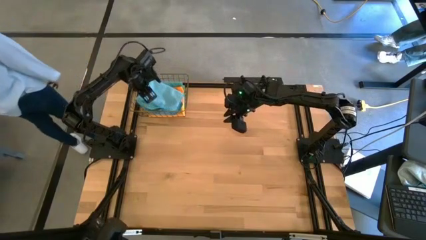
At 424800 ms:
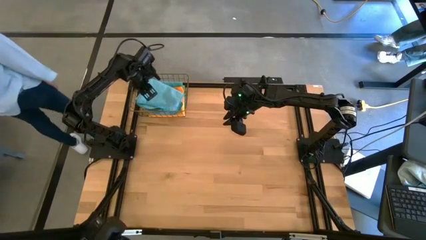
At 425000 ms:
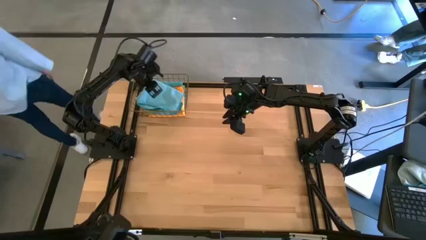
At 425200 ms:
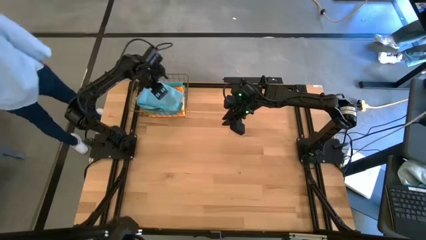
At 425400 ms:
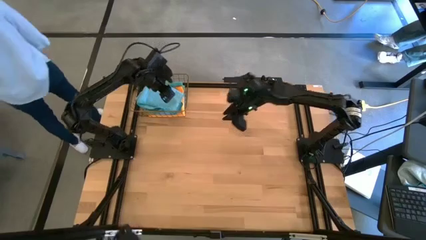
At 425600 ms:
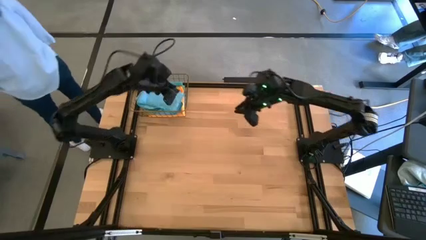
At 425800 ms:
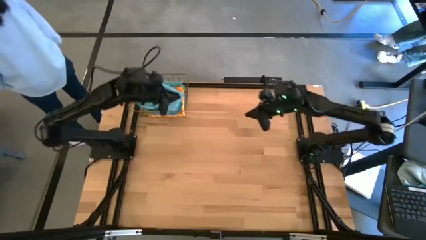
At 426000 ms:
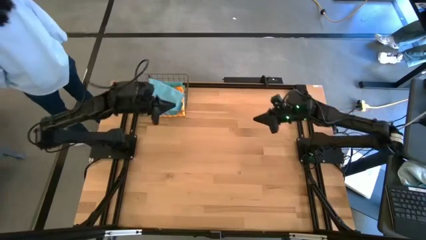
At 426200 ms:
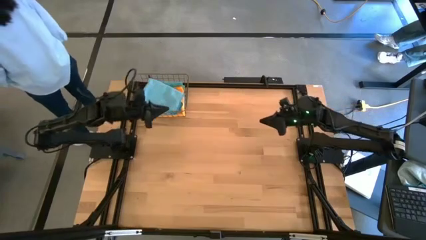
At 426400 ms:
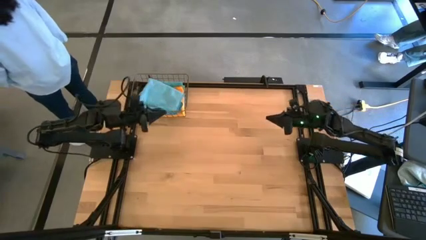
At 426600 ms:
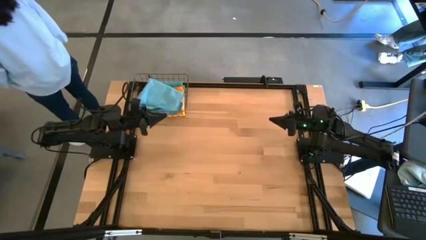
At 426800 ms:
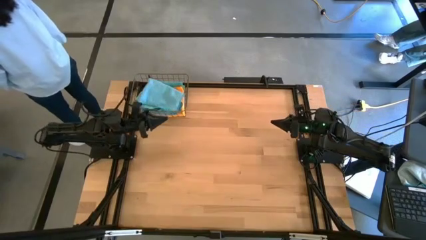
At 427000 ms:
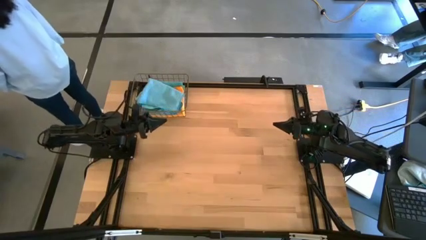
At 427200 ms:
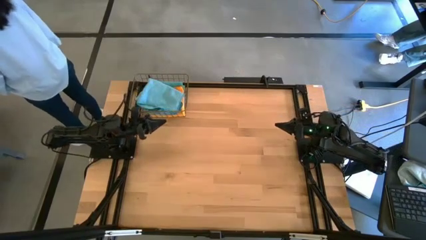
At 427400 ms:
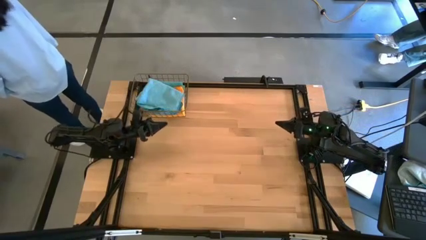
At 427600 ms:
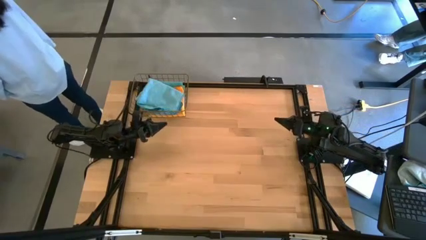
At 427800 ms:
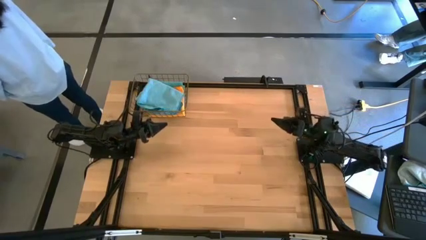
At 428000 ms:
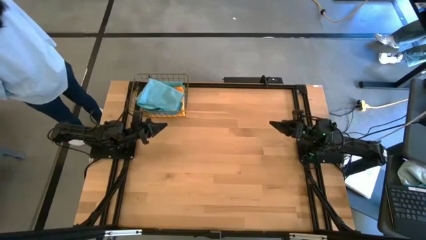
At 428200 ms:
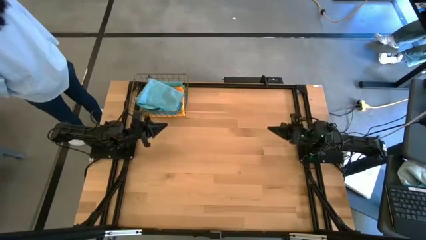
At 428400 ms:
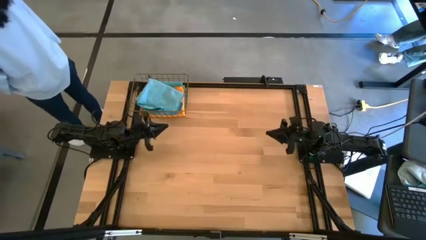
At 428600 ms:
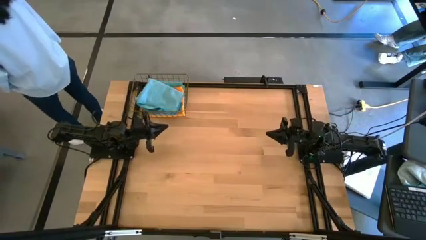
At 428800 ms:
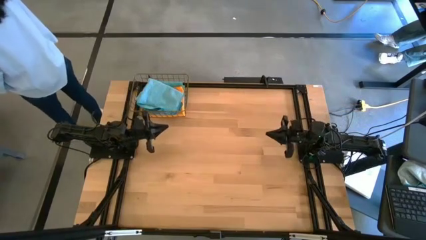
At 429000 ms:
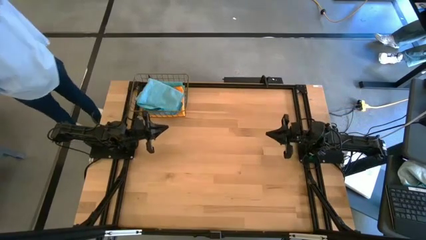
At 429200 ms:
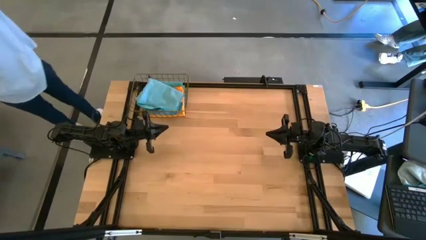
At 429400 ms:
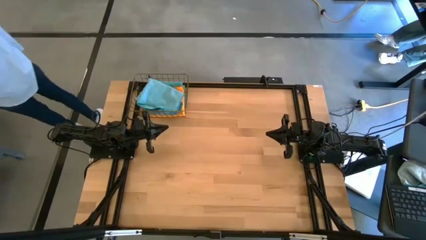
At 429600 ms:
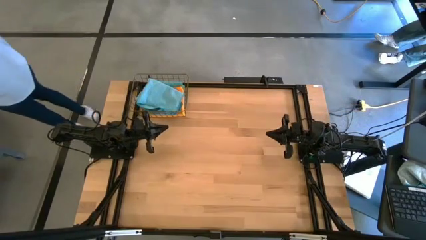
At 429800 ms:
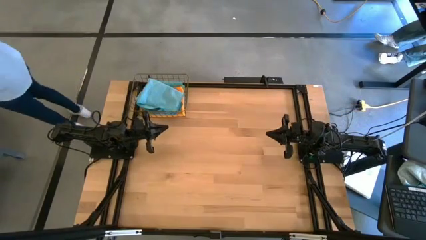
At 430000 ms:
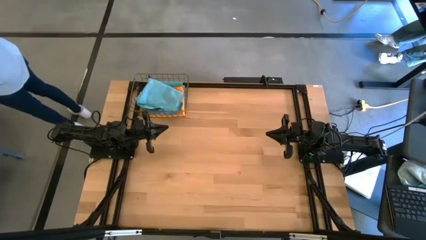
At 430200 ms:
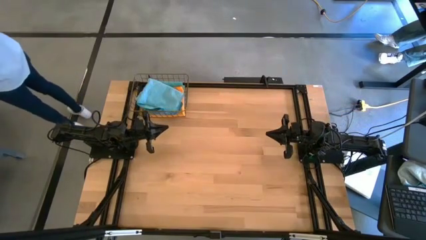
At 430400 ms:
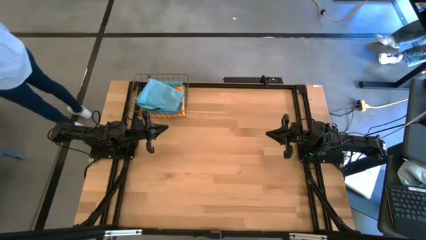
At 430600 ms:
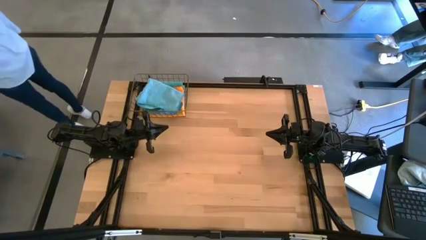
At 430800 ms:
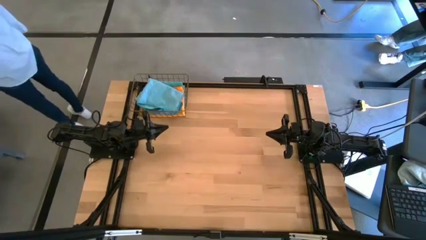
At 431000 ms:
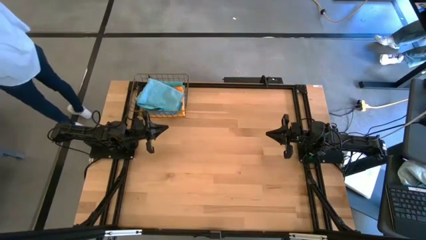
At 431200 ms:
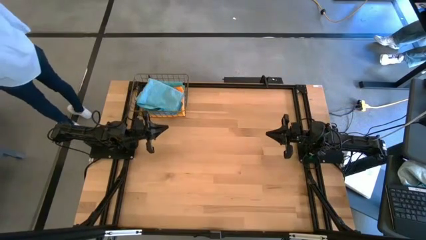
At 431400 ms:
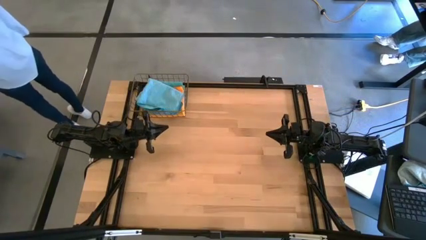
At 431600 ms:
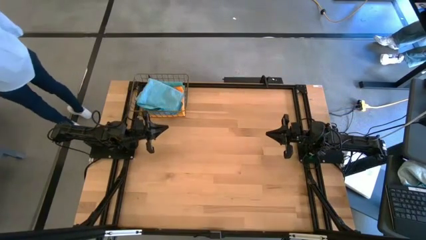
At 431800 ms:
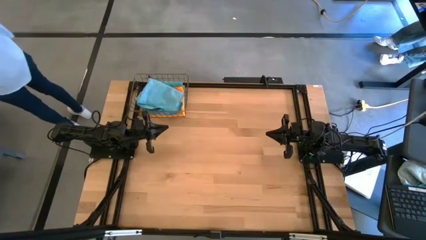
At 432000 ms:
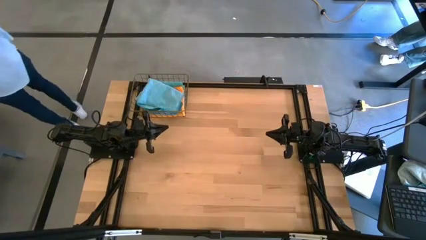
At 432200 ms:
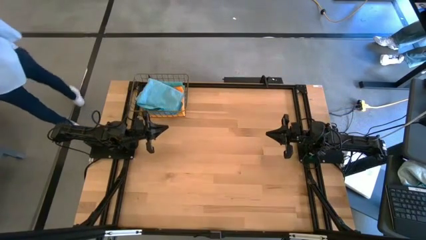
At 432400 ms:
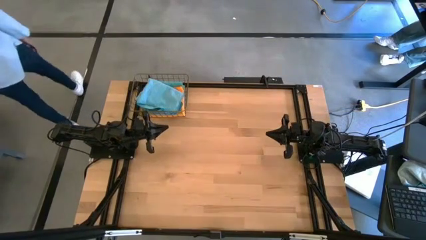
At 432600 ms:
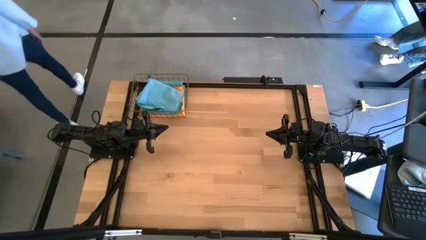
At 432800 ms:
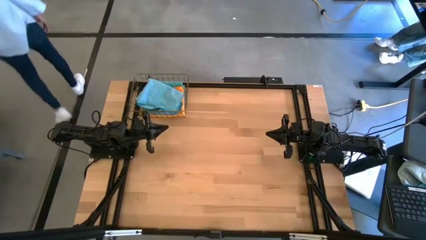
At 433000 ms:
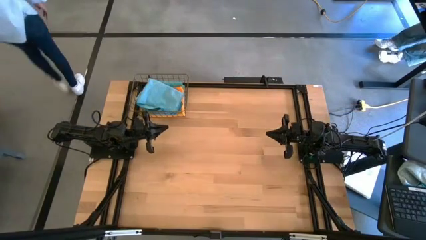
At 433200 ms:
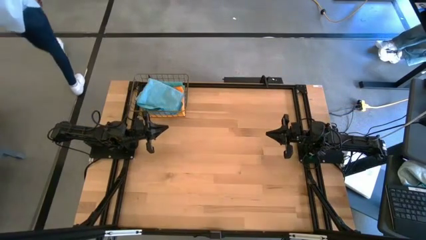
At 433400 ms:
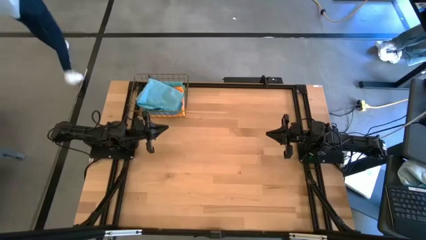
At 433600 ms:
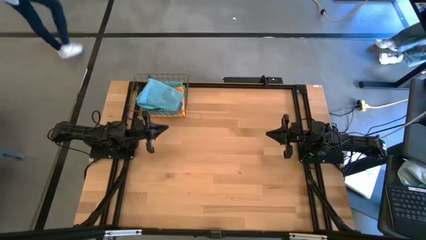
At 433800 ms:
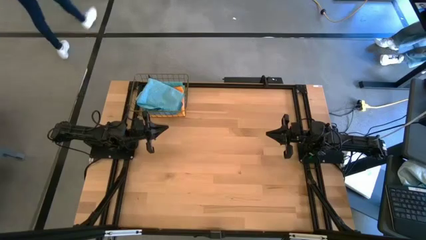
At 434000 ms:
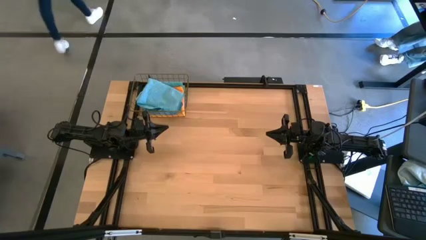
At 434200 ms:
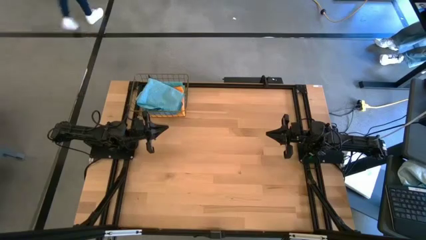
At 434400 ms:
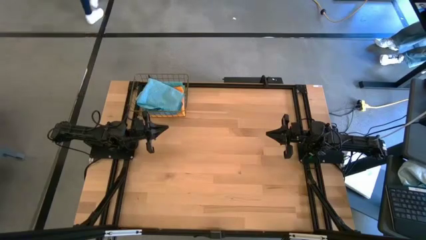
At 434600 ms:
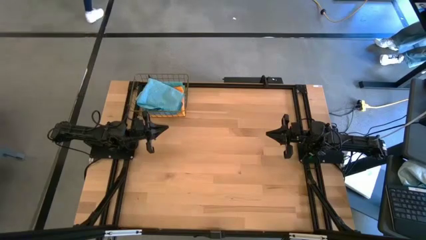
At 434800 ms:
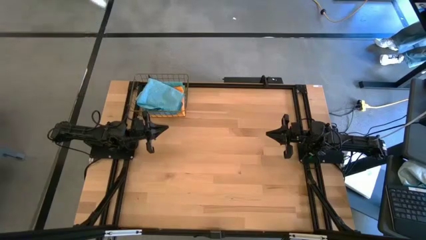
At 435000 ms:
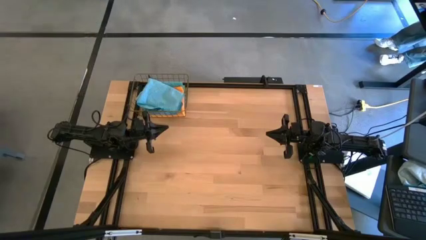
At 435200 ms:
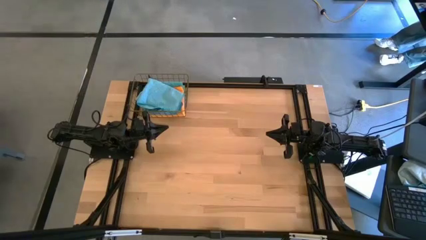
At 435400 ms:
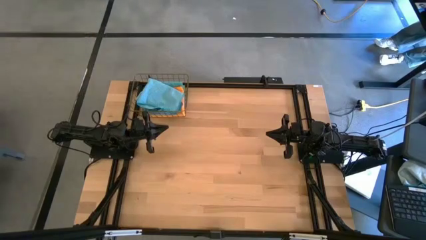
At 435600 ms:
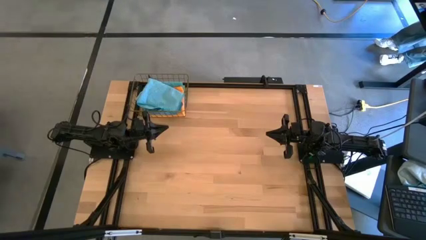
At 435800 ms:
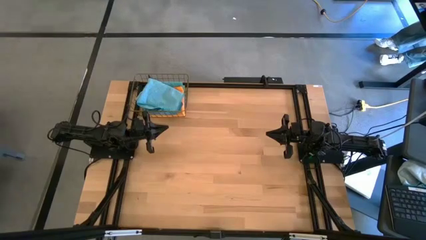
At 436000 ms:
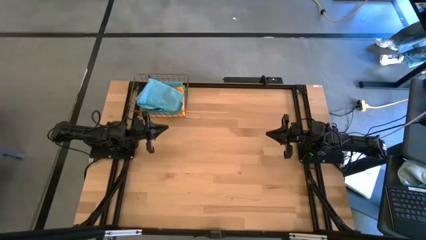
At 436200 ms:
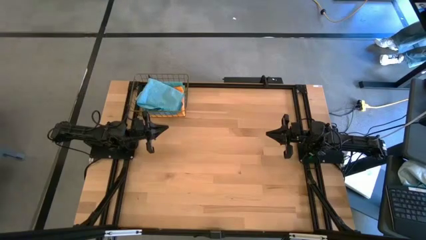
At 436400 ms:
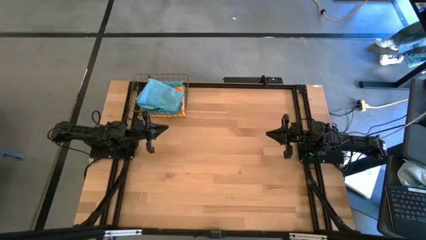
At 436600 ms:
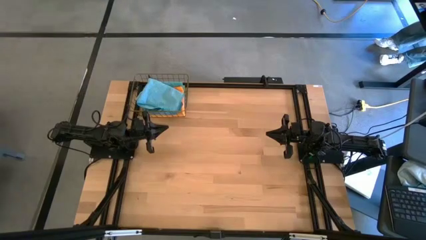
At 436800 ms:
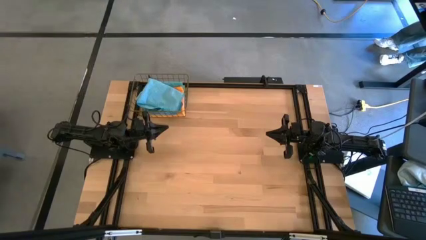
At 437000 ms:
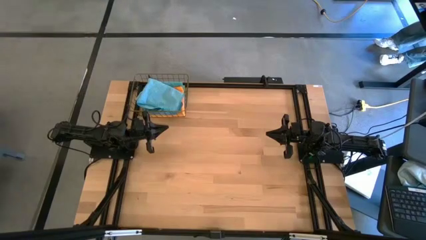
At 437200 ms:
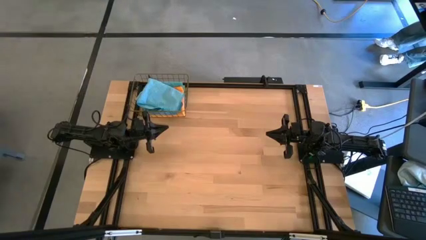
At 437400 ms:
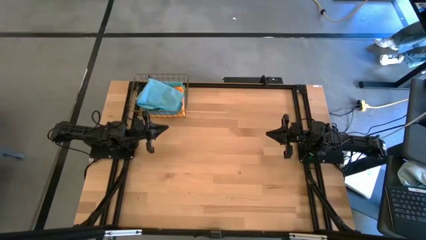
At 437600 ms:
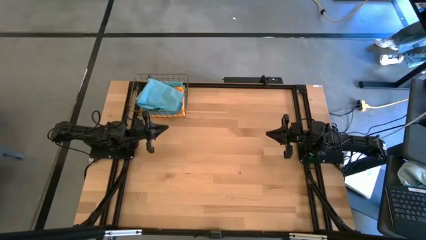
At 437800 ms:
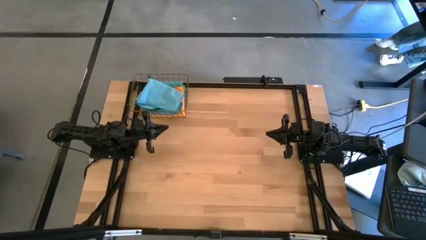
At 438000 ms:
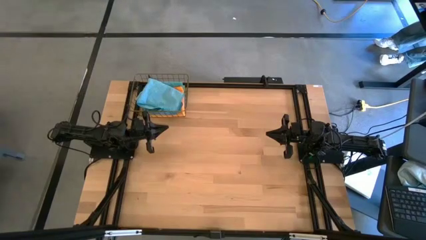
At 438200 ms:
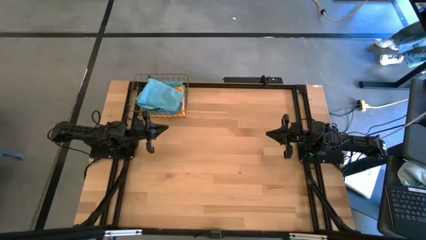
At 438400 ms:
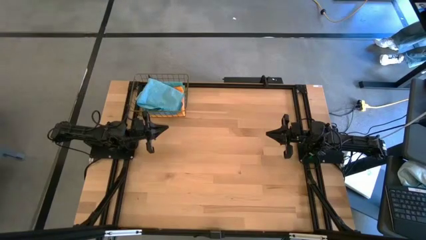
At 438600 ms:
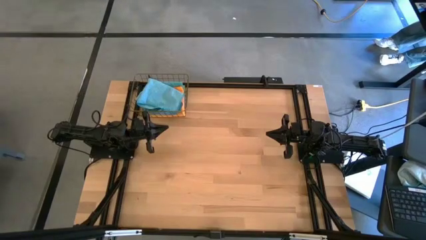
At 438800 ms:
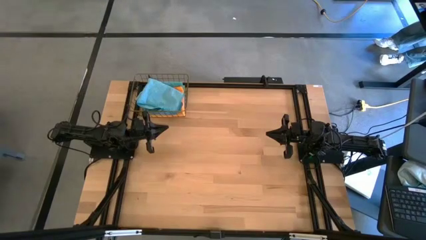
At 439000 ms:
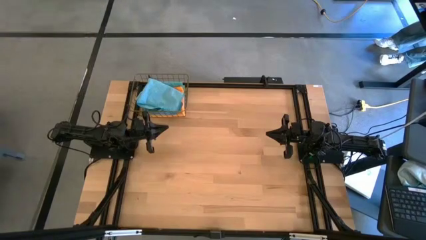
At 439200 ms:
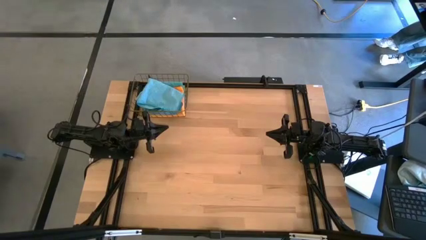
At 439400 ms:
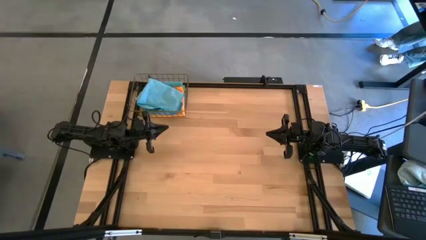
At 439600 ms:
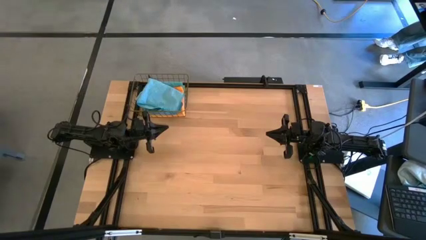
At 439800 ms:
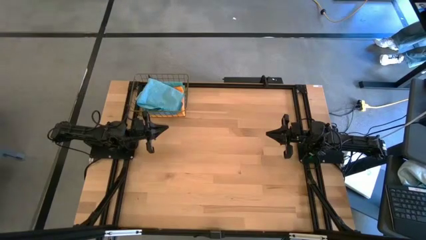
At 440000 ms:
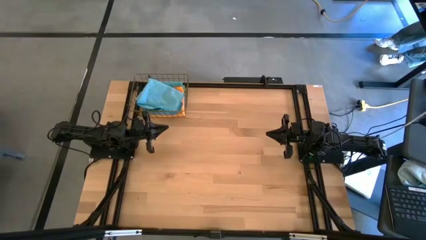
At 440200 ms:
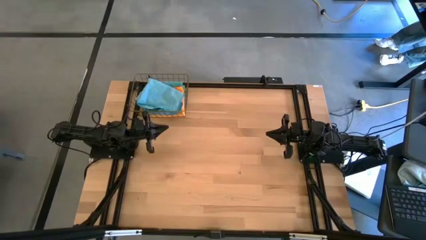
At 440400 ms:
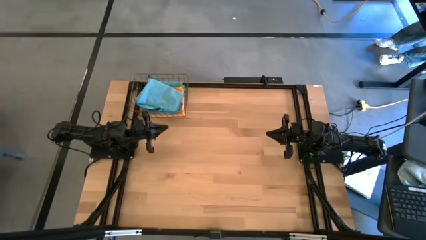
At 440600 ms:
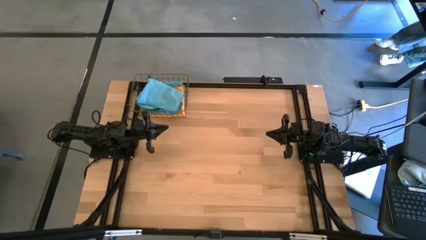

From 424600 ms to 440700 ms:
Task: Fold microfiber towels
Return to Home Position
